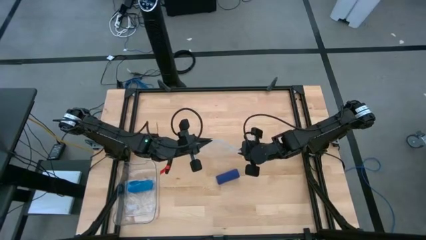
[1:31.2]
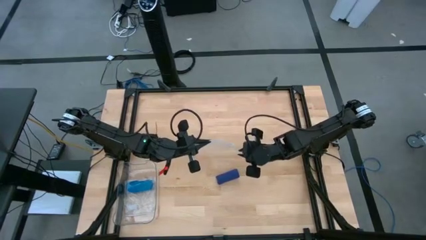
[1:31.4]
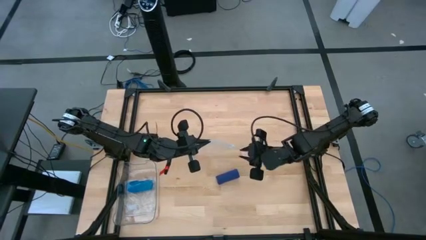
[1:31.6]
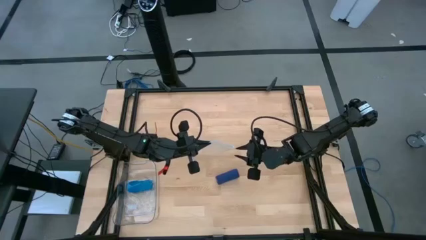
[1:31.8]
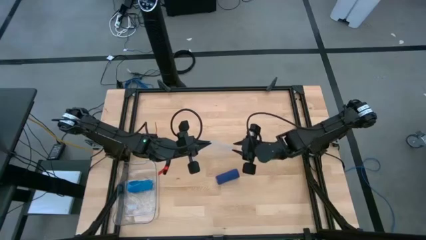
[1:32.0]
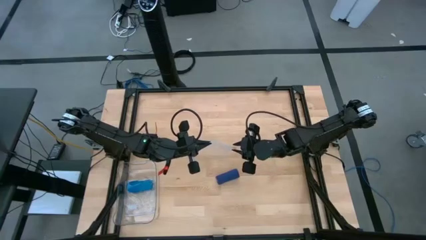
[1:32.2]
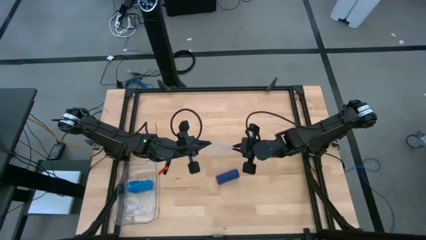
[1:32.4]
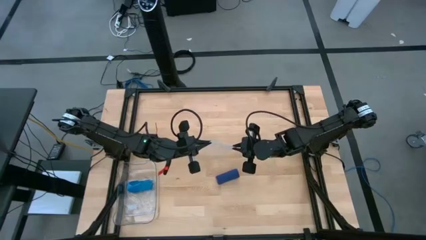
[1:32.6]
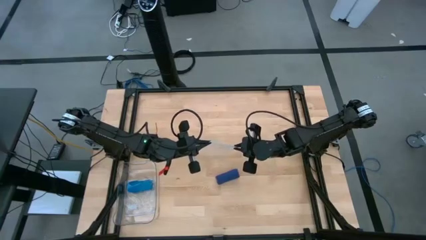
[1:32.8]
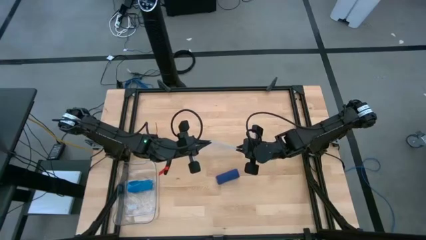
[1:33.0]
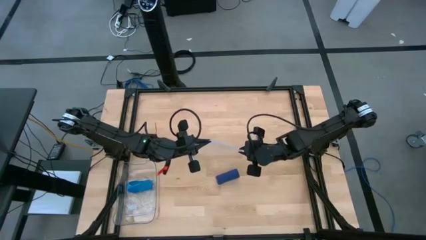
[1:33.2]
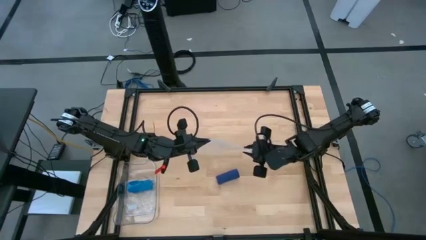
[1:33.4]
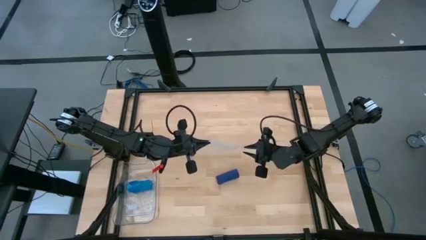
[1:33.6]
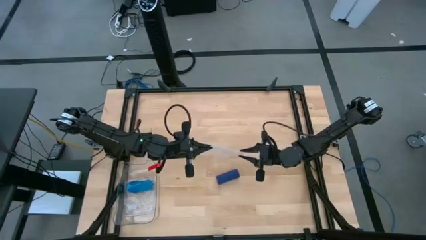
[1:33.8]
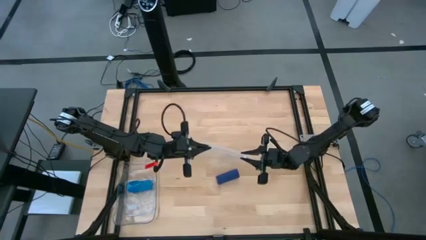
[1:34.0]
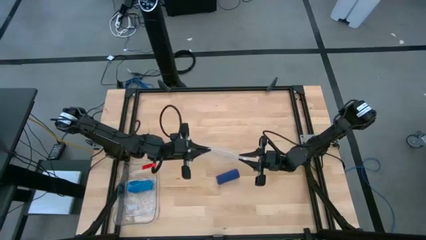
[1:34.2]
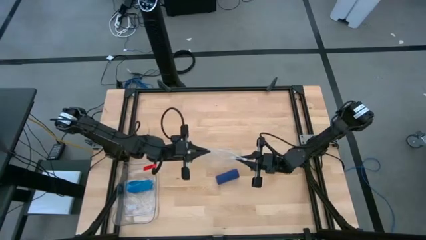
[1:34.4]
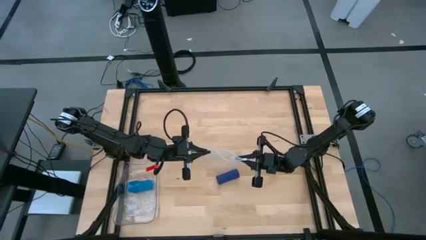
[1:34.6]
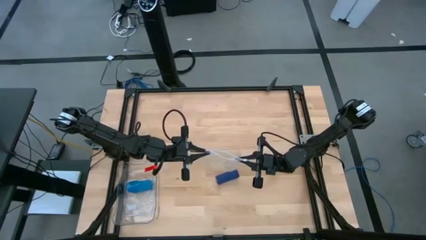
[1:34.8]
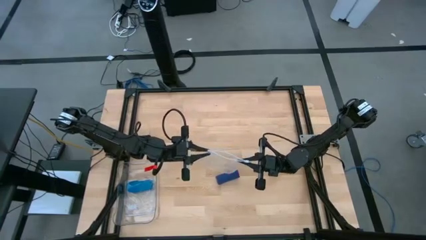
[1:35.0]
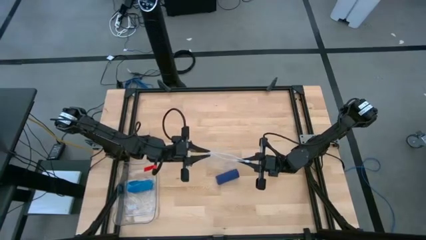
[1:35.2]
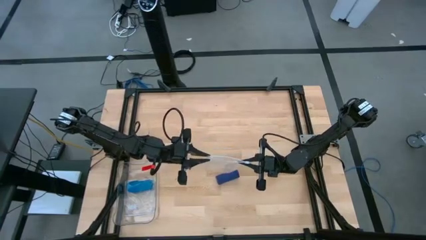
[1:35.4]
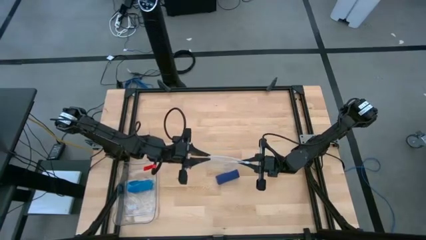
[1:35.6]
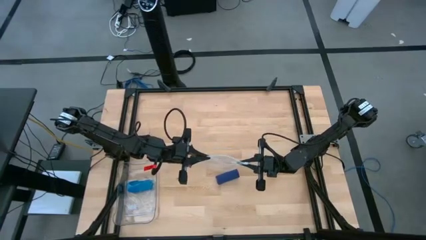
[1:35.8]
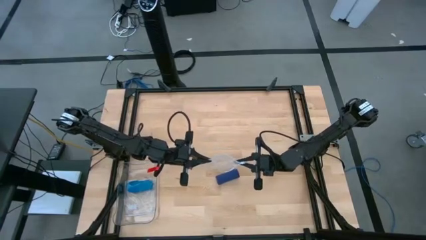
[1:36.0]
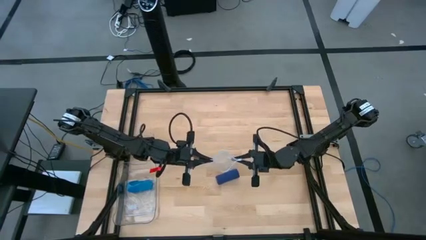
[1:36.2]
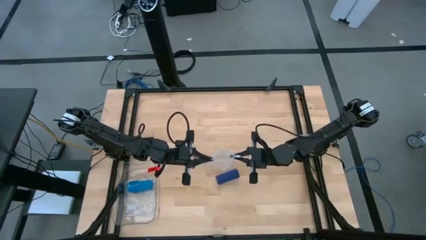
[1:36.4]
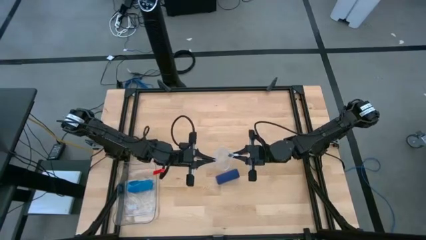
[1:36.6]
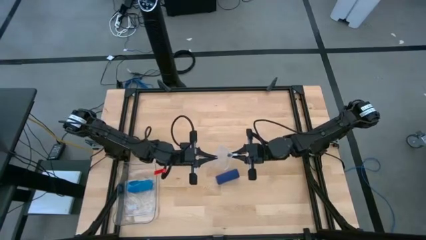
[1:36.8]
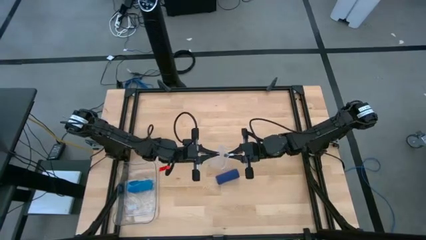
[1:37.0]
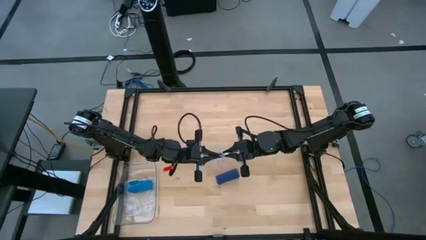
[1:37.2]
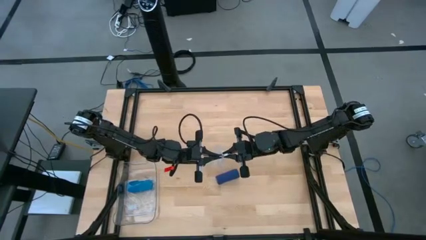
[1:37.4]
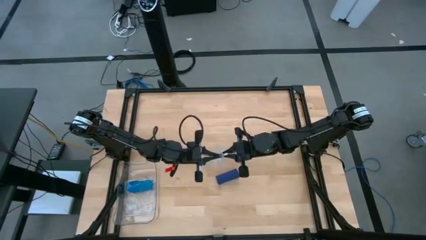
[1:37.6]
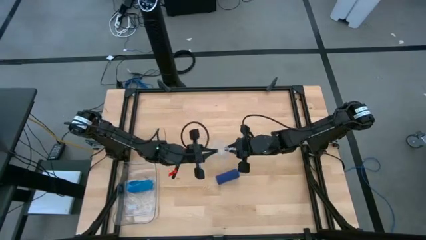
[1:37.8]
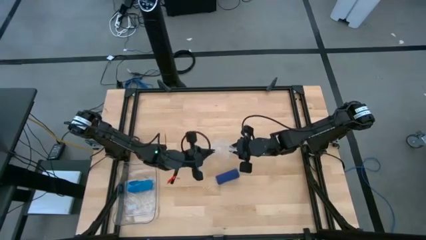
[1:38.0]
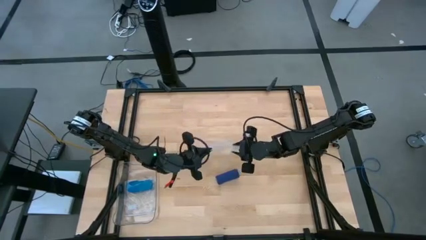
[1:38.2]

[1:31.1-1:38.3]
Task: Roll bandage
Open the transparent zip bag

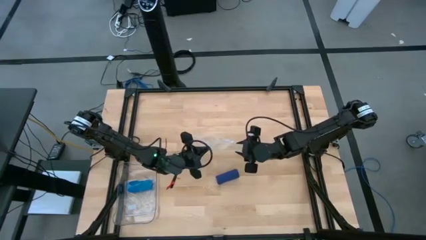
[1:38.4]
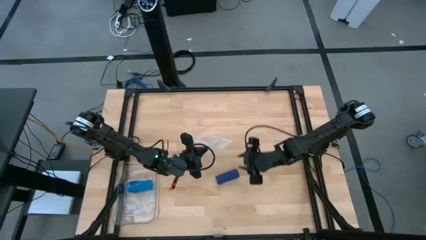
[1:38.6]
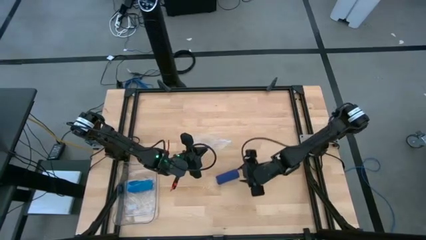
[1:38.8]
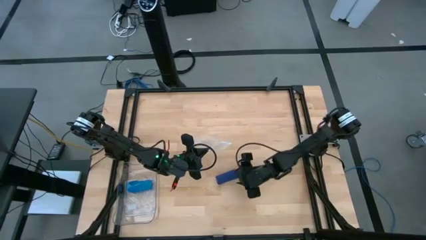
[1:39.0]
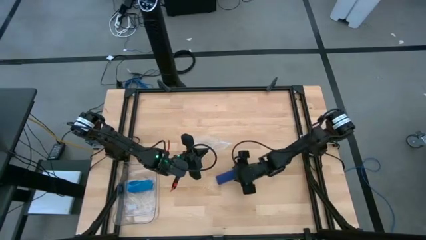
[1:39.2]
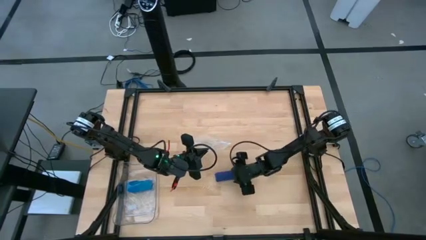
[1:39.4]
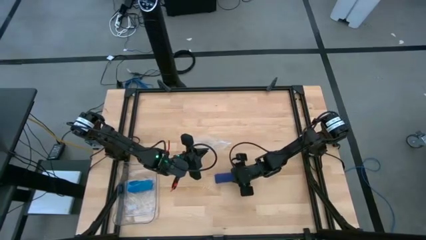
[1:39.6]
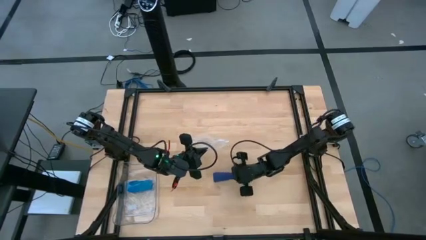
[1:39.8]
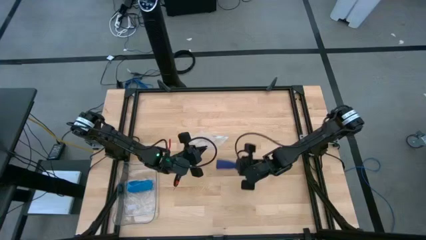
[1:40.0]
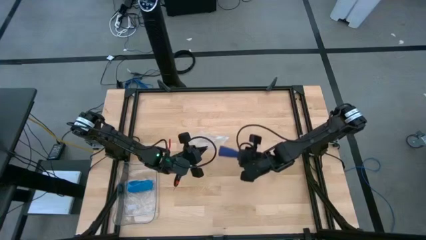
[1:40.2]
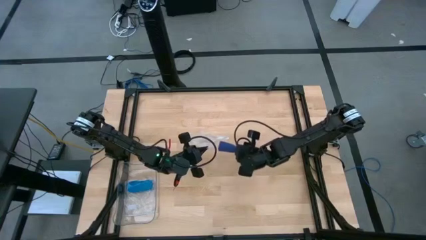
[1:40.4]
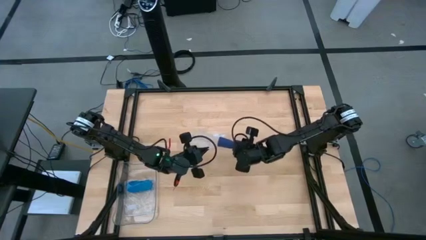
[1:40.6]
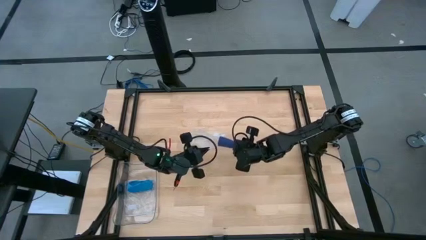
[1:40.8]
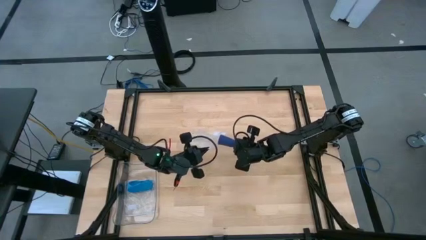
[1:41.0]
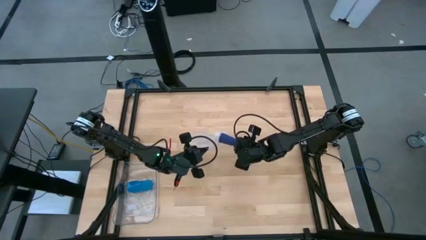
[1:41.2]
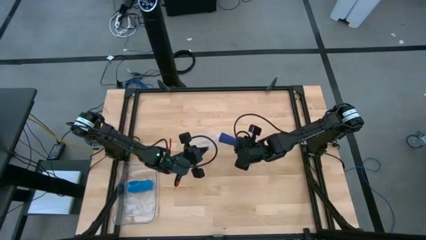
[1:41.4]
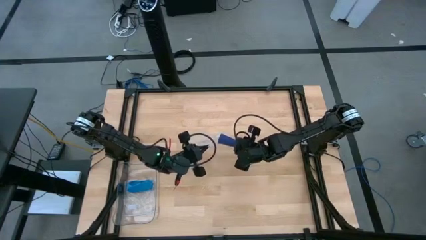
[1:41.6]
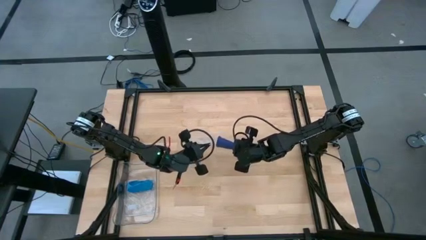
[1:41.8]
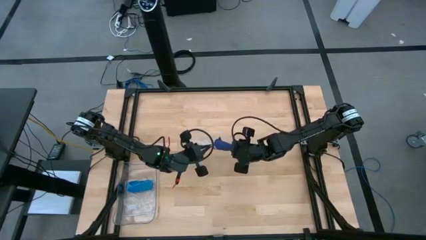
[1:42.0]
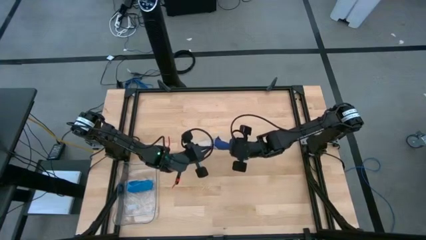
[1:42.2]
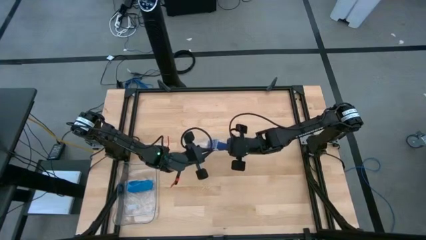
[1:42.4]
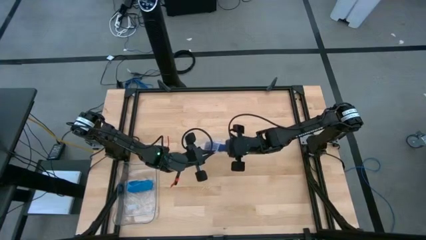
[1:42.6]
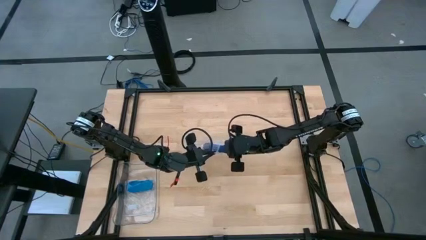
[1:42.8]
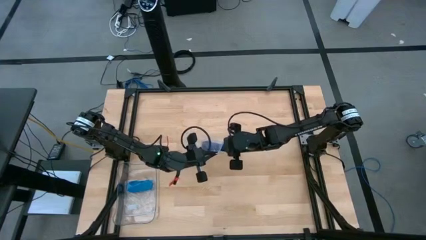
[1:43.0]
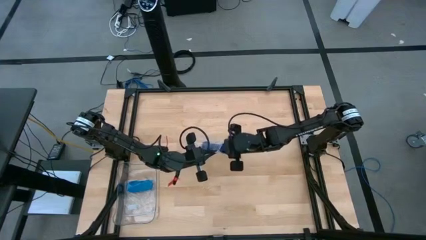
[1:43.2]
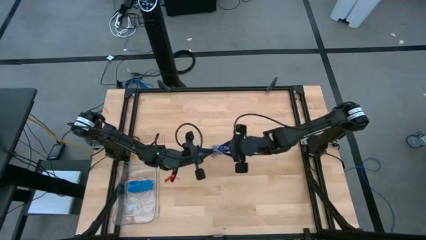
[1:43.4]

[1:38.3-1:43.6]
Put the blue rolled bandage into the transparent zip bag
